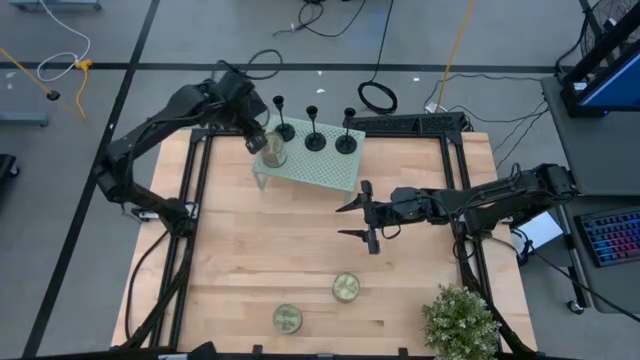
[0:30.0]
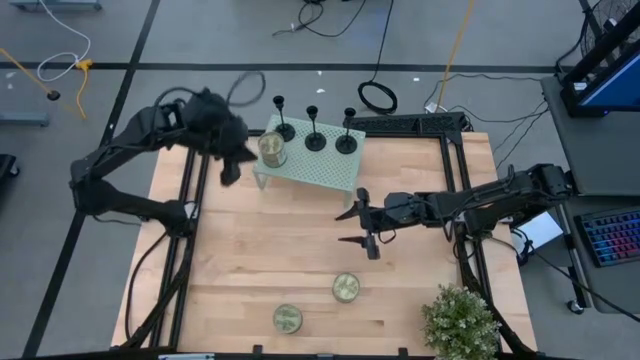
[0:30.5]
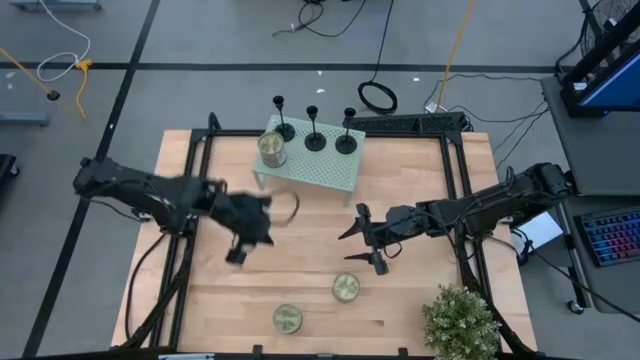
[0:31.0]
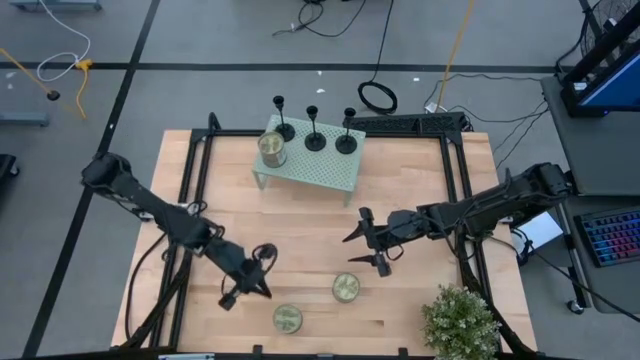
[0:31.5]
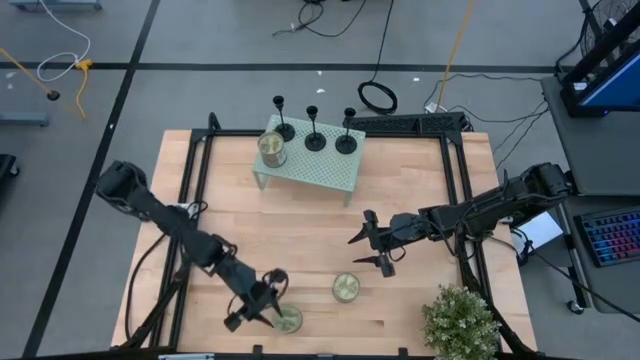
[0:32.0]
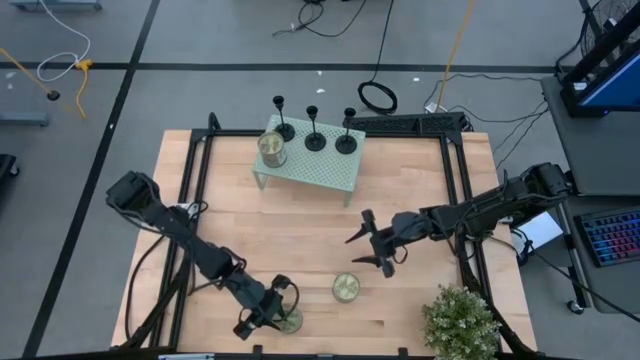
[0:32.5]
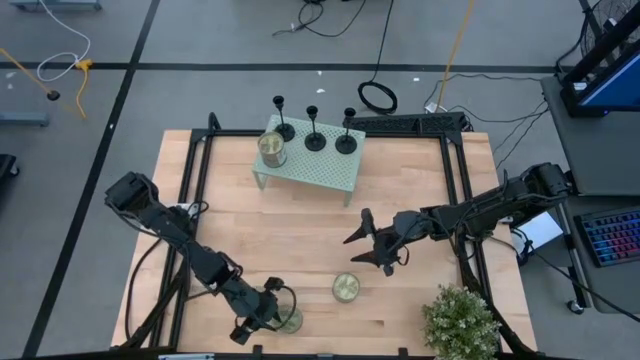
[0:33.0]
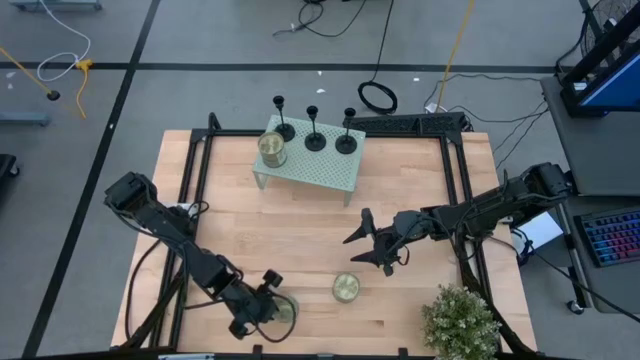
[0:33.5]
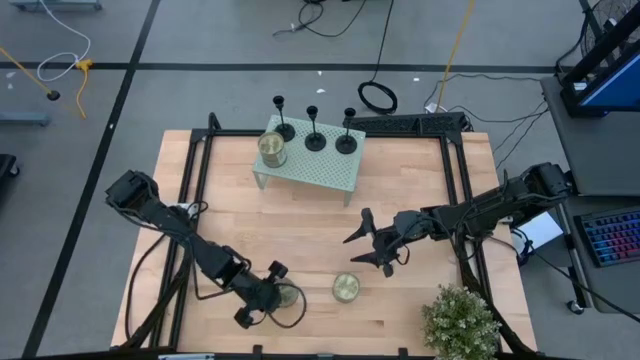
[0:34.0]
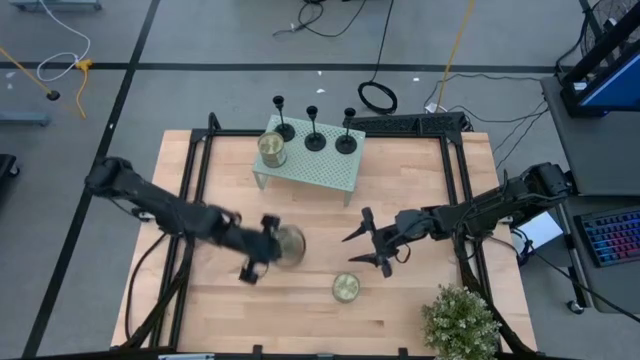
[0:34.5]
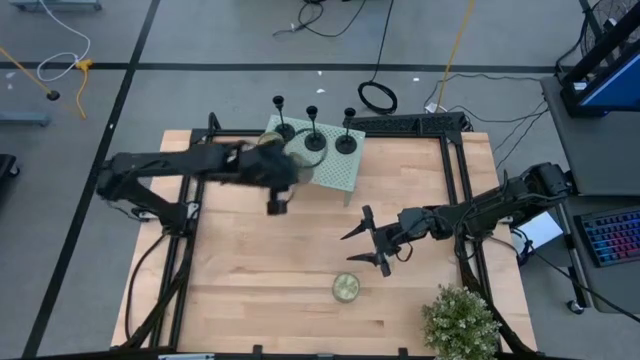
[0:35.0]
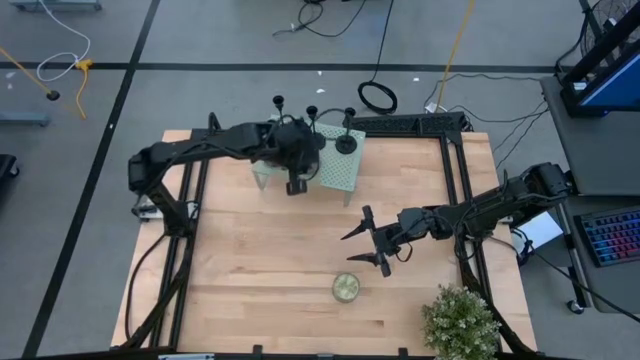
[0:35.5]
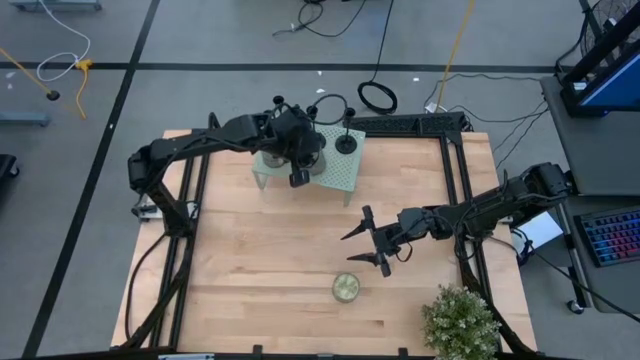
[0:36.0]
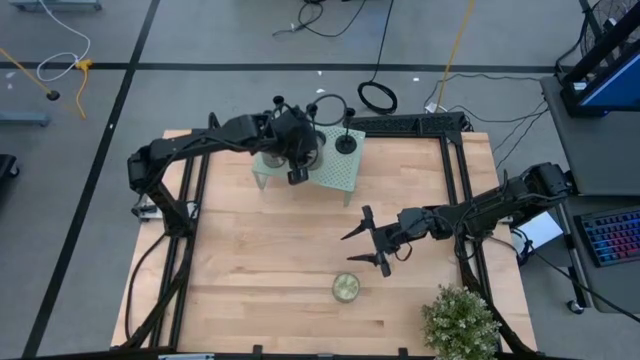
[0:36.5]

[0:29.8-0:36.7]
Task: Pick & Place candle stick holders
Put the bottom silver scented candle on the shelf aligned with the other silver scented candle

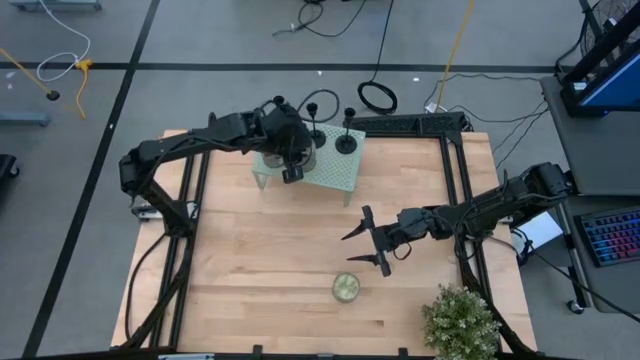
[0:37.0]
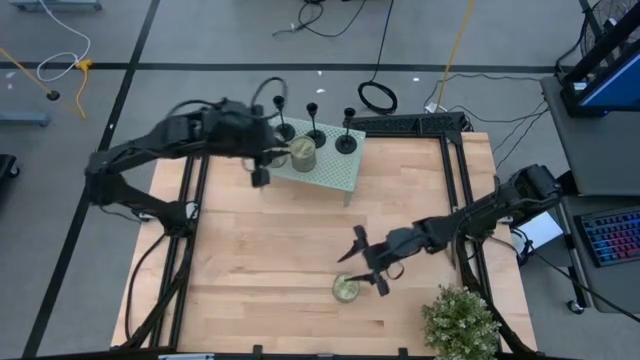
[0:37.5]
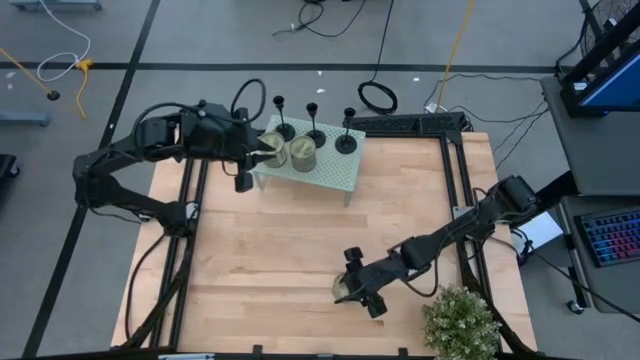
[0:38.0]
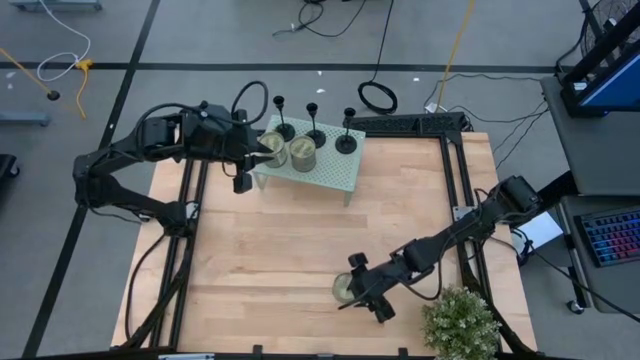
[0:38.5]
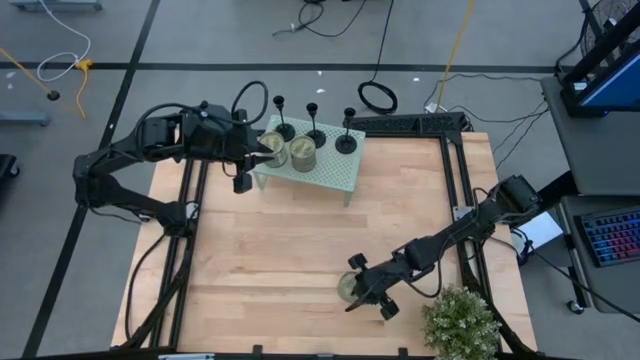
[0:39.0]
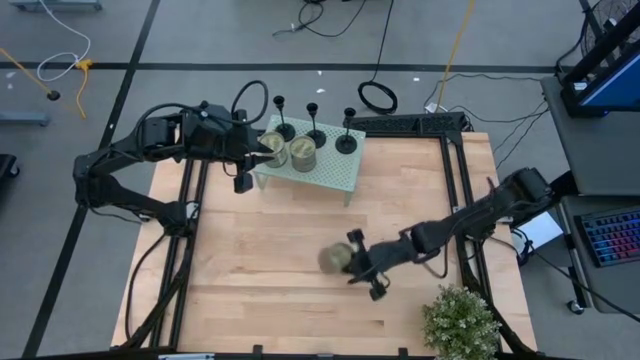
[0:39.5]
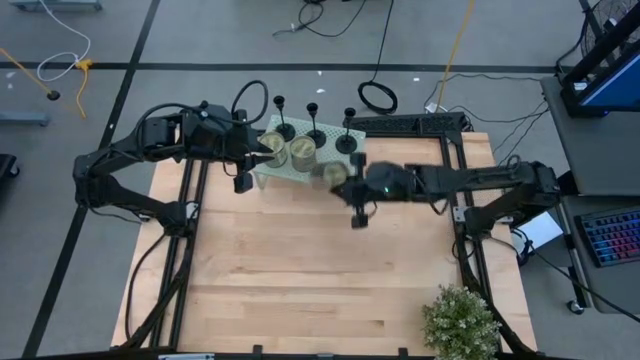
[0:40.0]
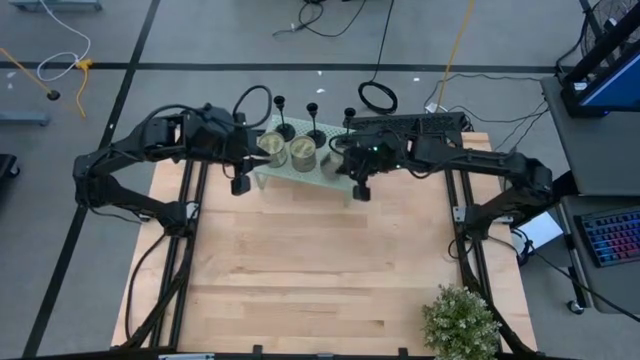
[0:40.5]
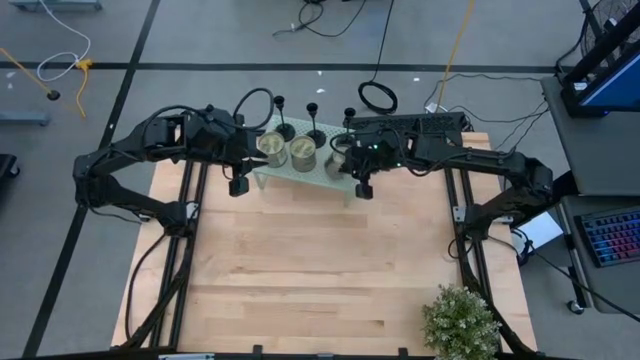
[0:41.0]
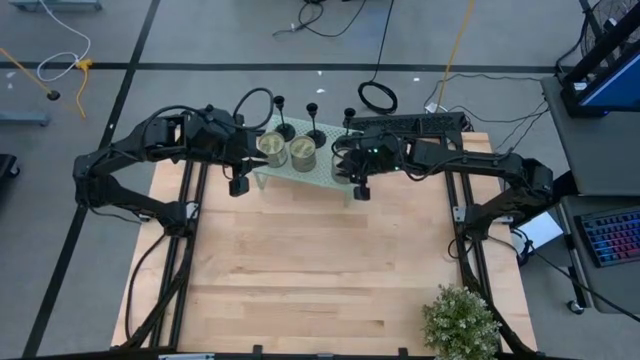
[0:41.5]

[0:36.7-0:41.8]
Put the silver scented candle on the shelf aligned with the other silver scented candle

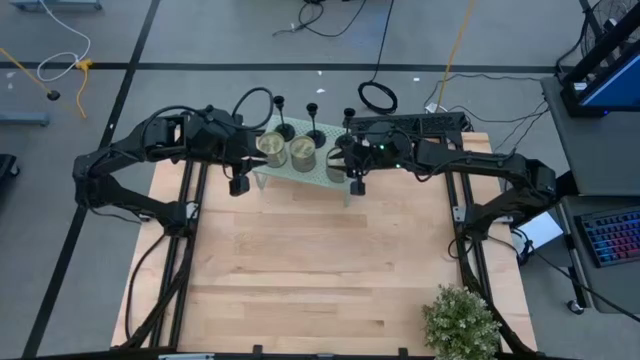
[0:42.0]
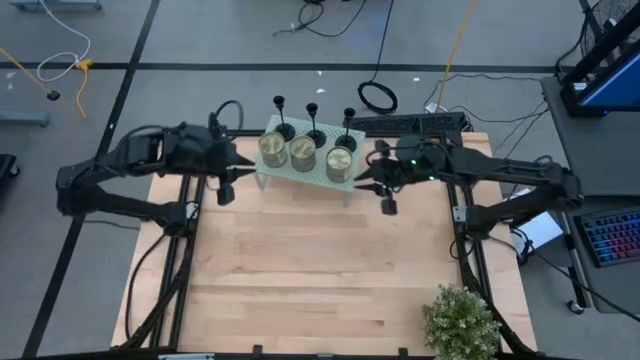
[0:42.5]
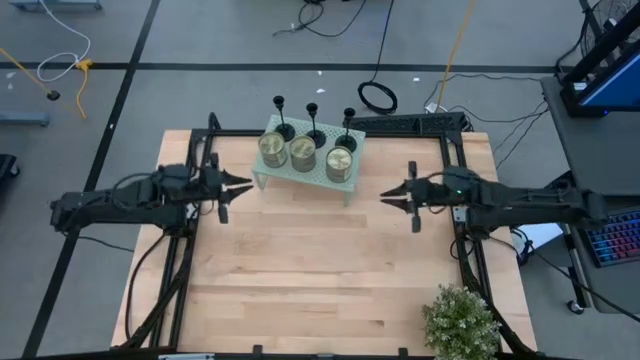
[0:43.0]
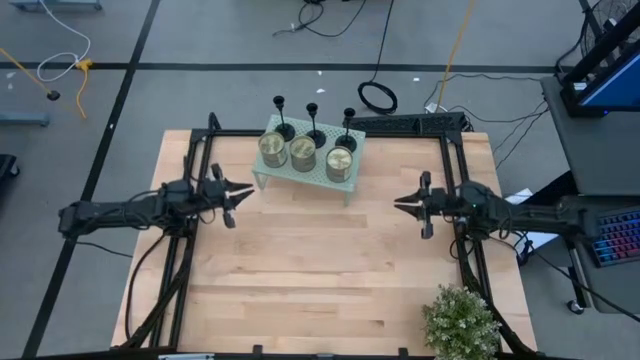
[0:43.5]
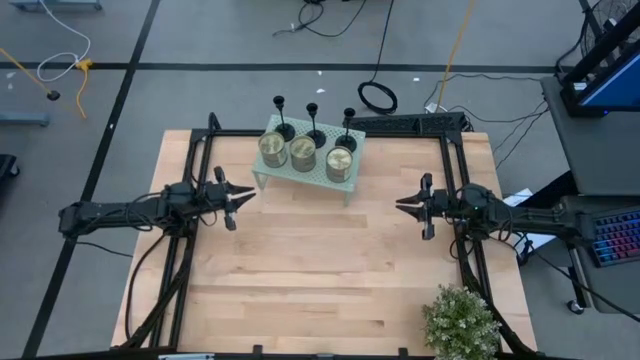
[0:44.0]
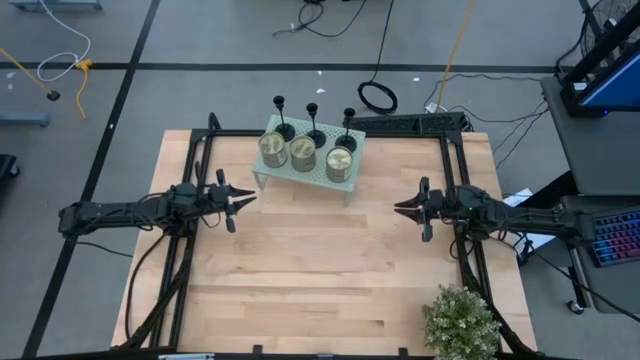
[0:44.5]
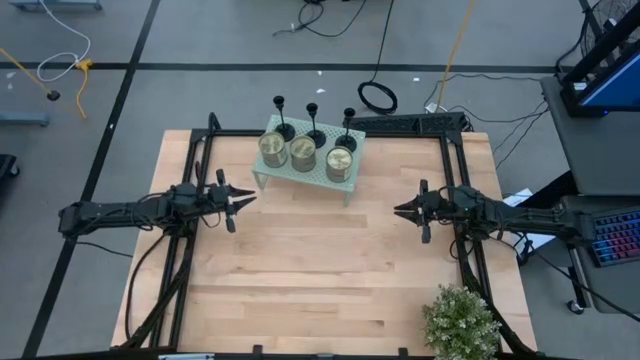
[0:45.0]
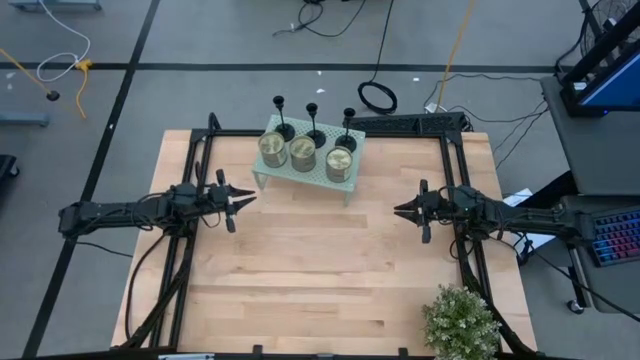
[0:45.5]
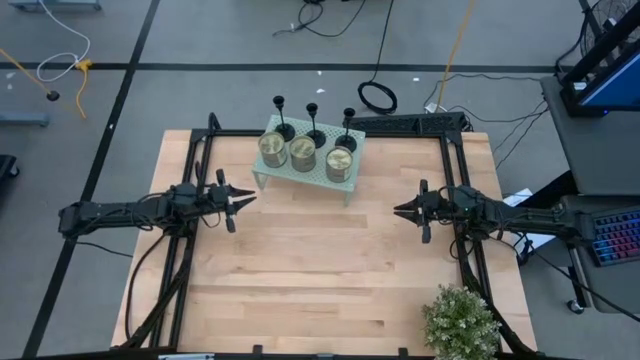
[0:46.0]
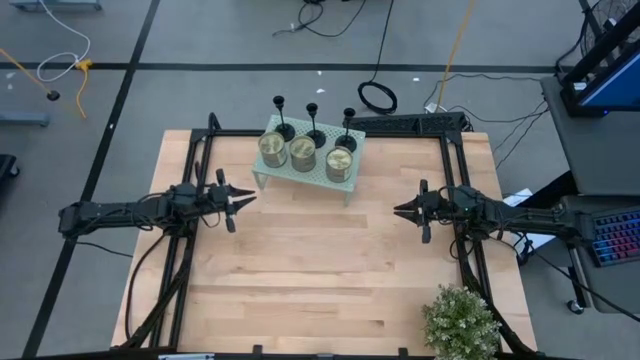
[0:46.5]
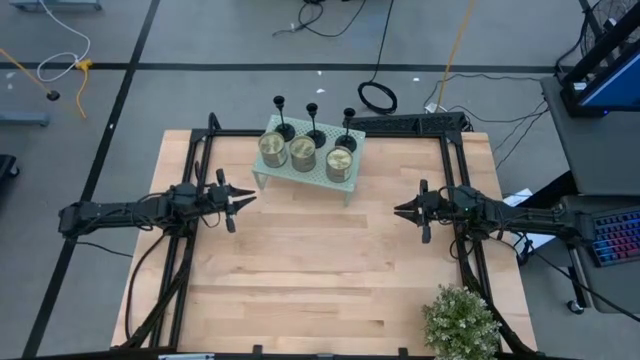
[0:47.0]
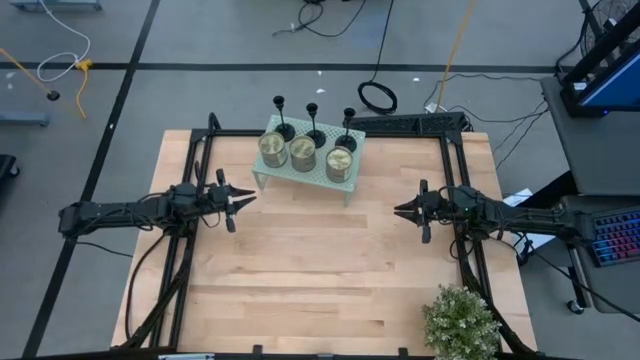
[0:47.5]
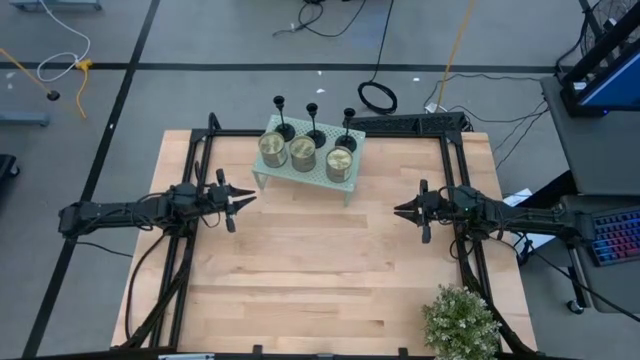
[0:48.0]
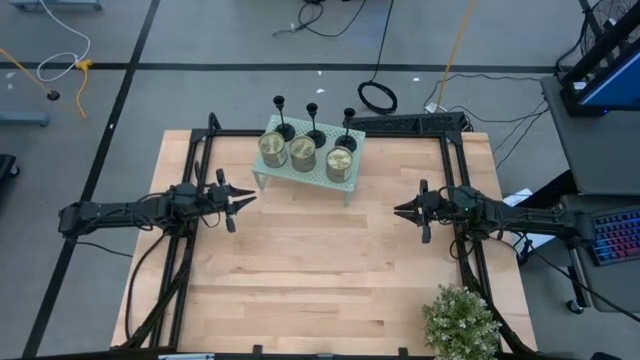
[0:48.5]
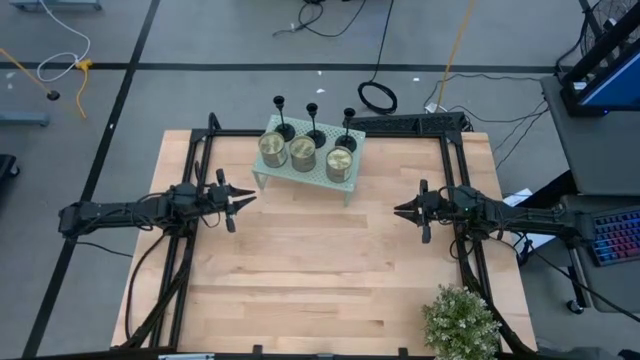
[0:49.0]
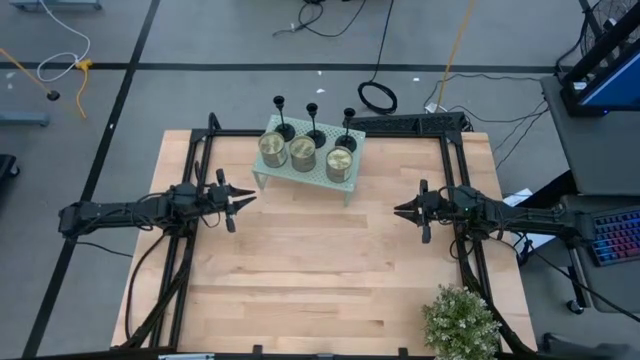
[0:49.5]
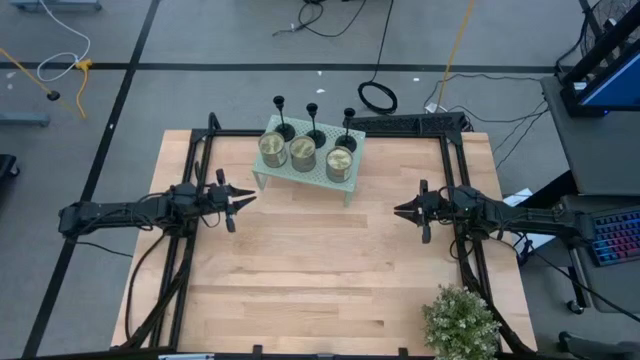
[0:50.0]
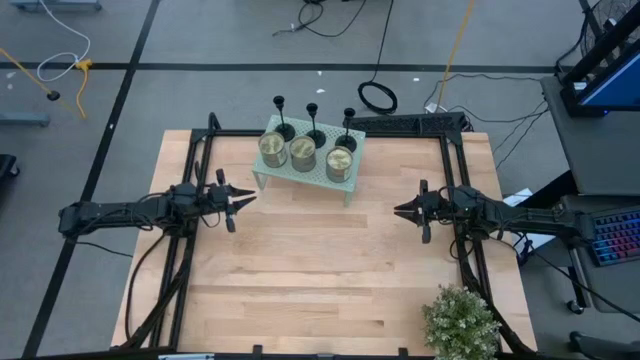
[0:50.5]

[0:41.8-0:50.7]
Return to Home Position
